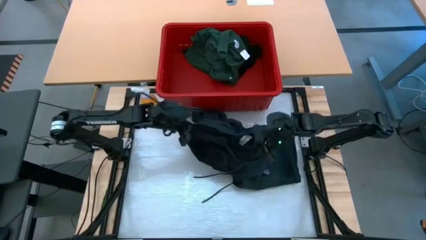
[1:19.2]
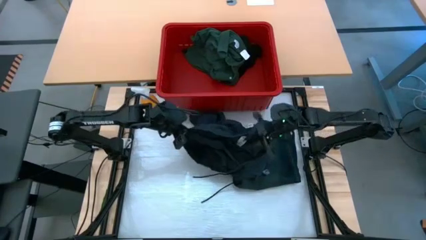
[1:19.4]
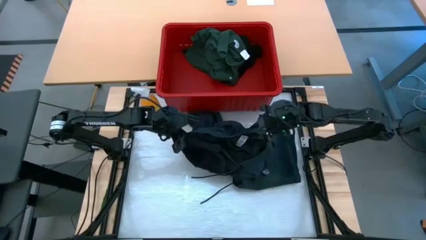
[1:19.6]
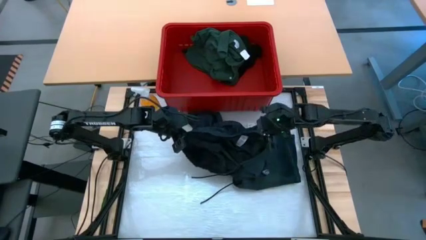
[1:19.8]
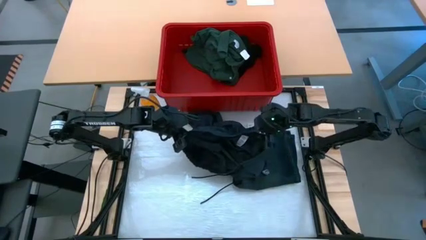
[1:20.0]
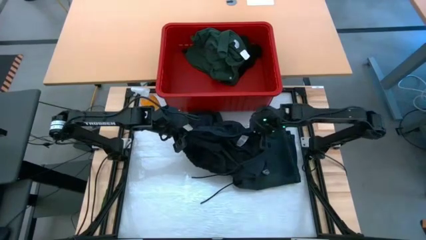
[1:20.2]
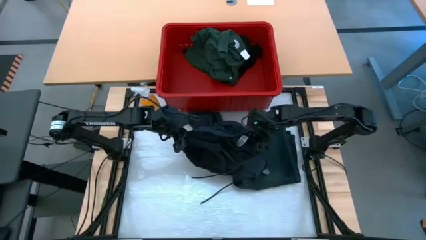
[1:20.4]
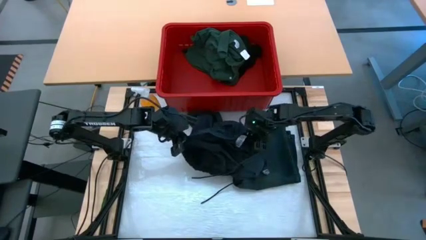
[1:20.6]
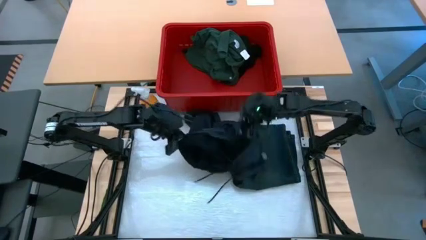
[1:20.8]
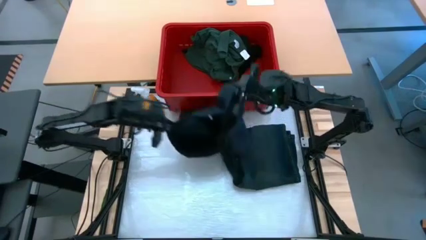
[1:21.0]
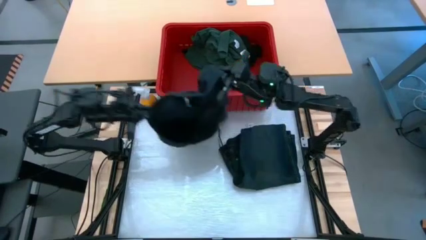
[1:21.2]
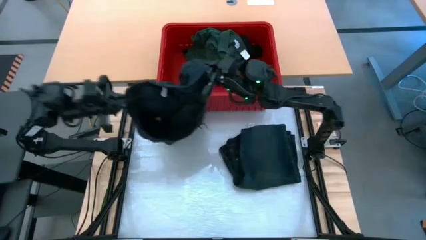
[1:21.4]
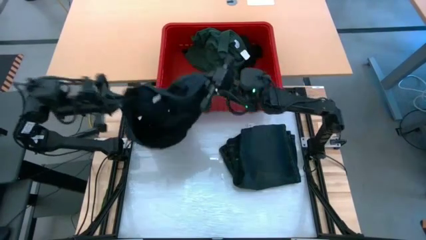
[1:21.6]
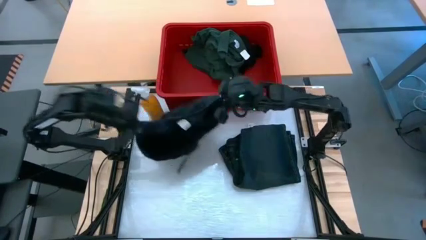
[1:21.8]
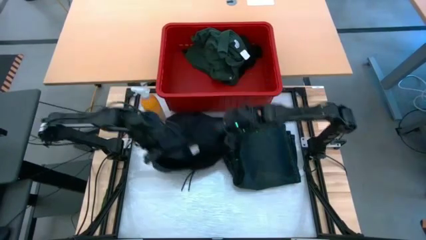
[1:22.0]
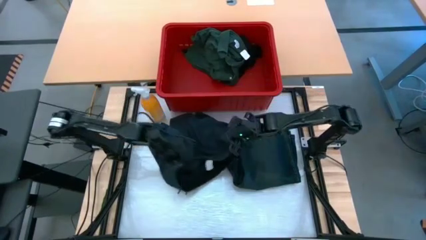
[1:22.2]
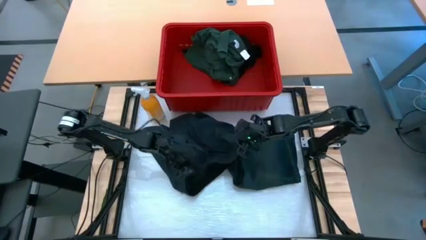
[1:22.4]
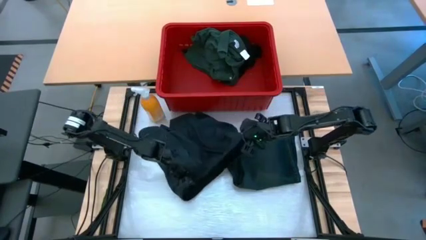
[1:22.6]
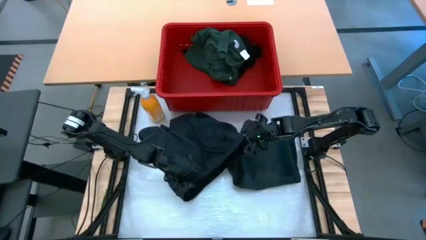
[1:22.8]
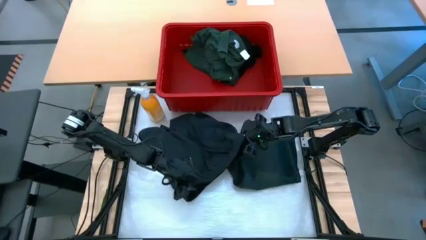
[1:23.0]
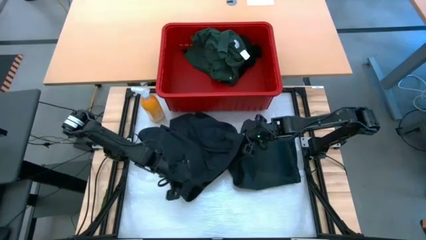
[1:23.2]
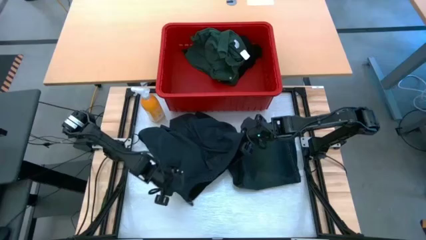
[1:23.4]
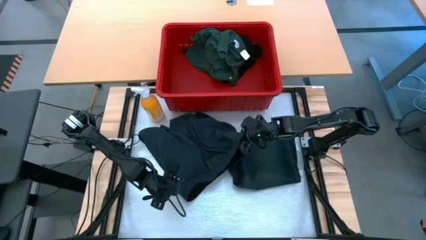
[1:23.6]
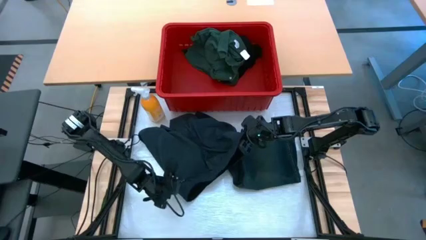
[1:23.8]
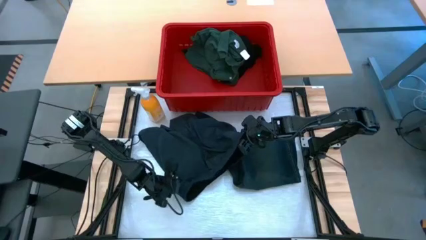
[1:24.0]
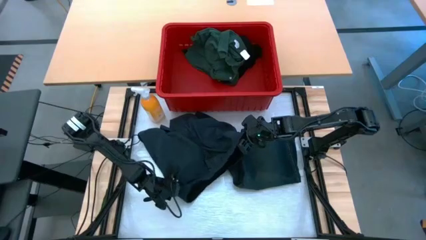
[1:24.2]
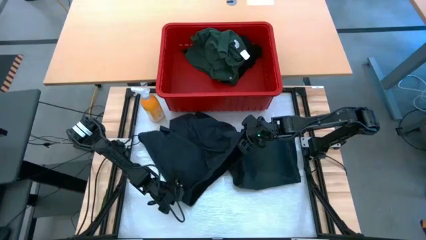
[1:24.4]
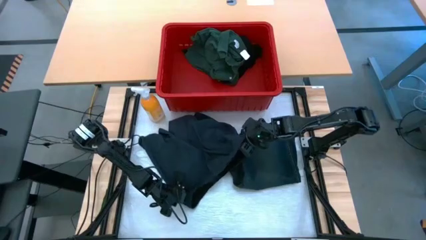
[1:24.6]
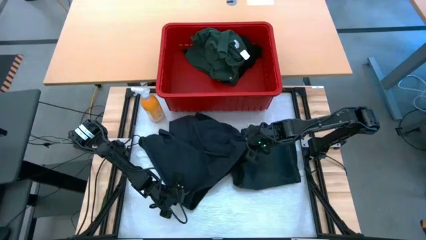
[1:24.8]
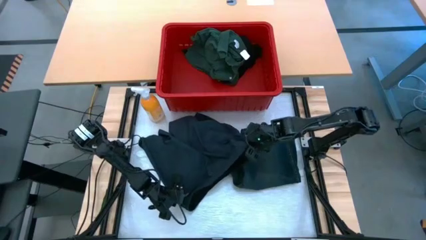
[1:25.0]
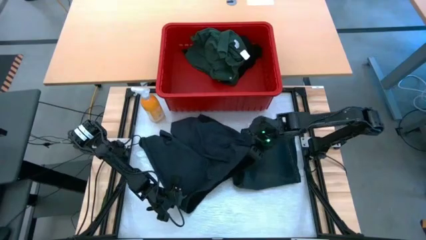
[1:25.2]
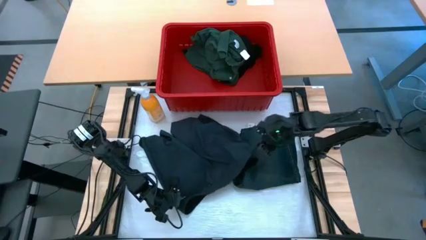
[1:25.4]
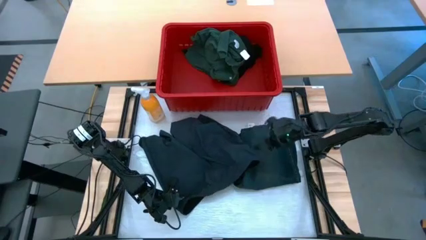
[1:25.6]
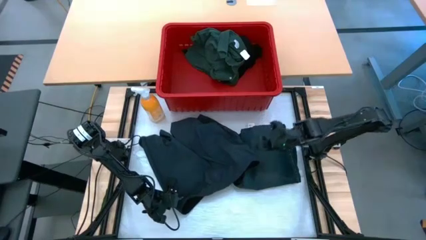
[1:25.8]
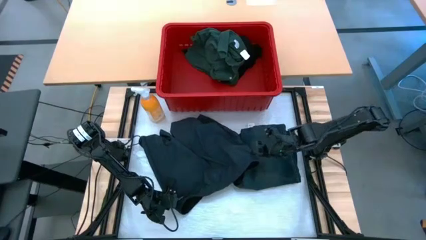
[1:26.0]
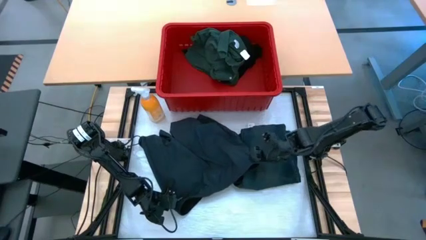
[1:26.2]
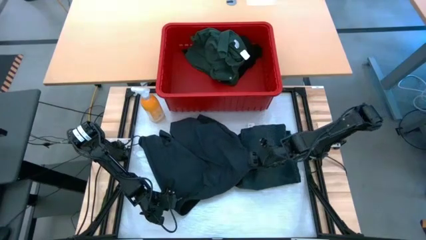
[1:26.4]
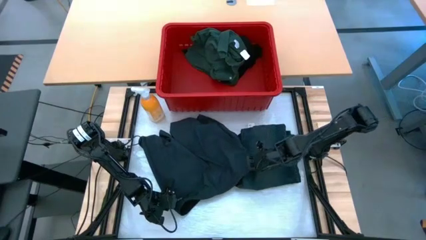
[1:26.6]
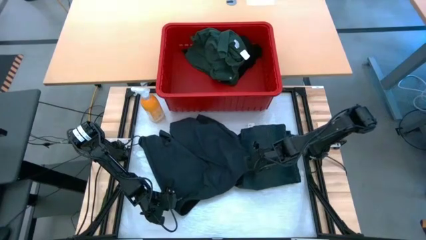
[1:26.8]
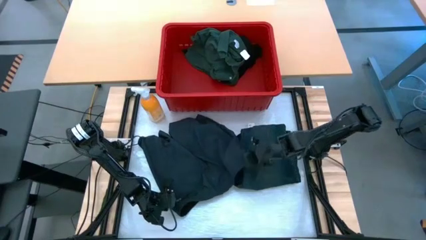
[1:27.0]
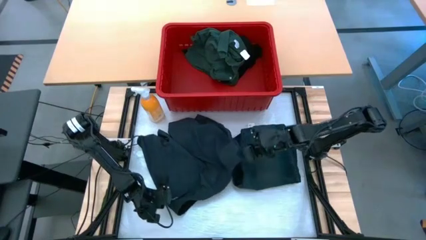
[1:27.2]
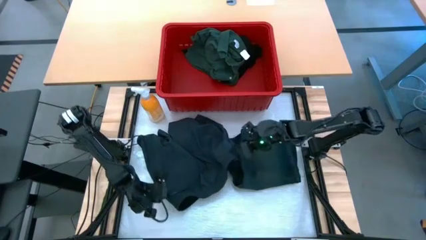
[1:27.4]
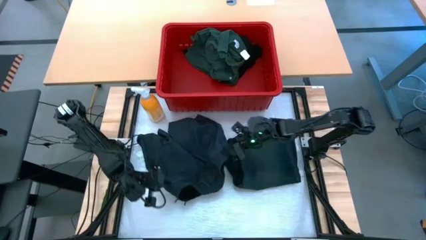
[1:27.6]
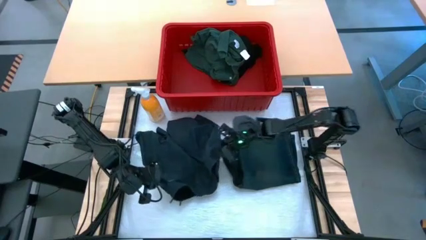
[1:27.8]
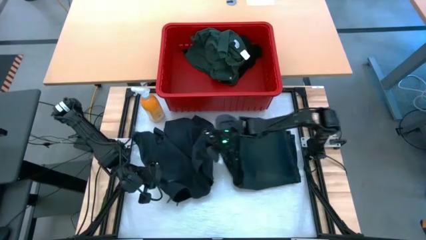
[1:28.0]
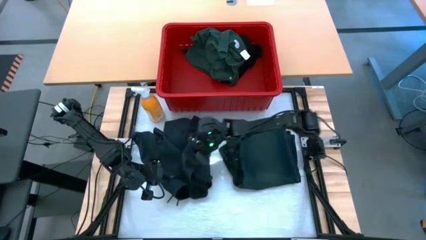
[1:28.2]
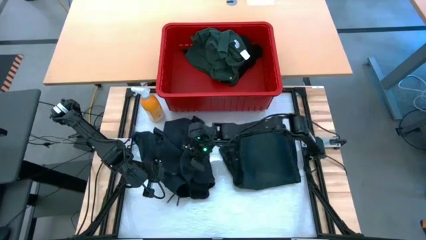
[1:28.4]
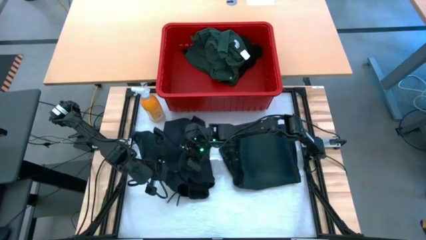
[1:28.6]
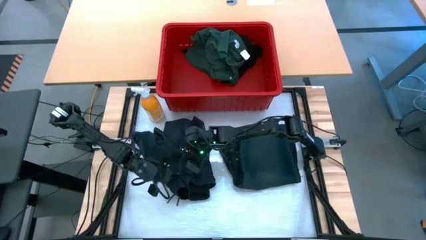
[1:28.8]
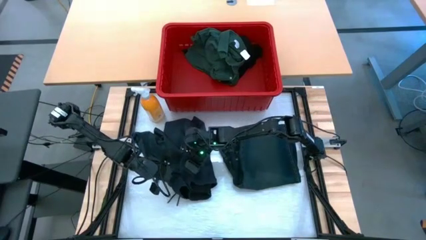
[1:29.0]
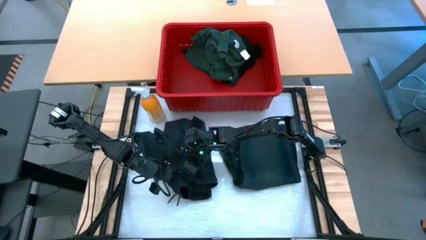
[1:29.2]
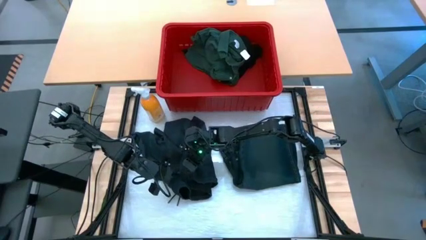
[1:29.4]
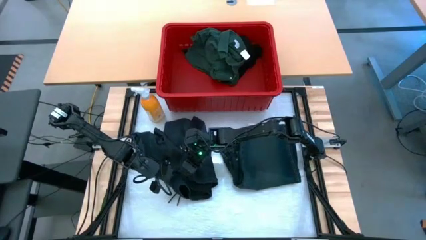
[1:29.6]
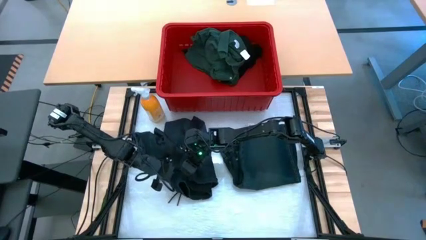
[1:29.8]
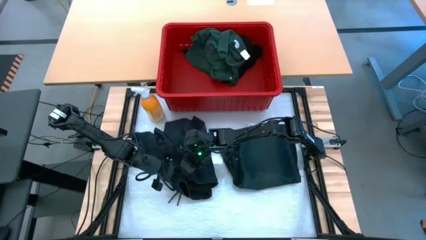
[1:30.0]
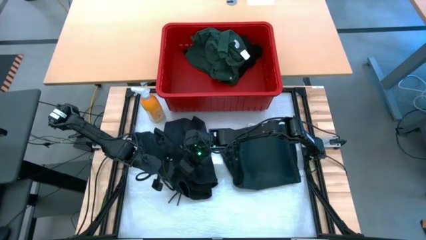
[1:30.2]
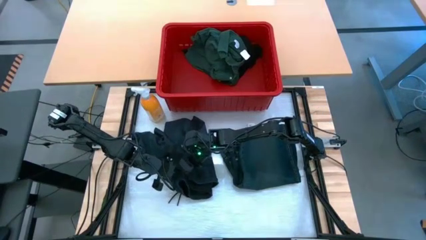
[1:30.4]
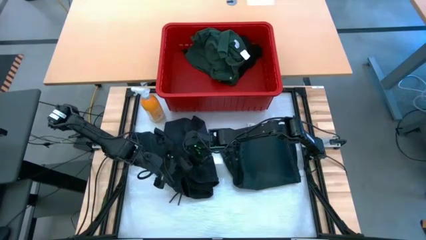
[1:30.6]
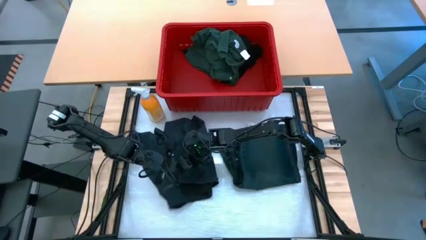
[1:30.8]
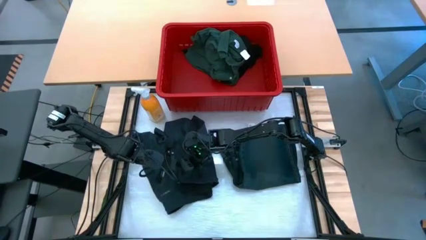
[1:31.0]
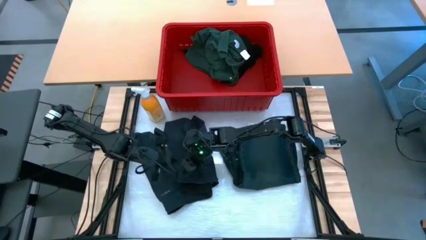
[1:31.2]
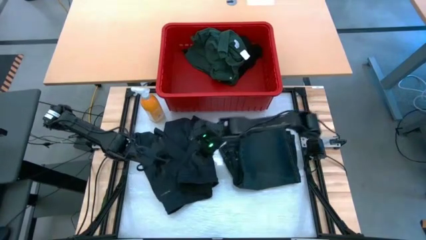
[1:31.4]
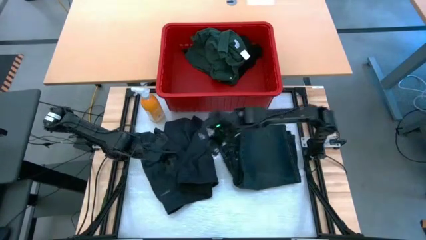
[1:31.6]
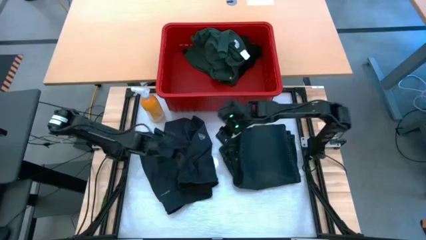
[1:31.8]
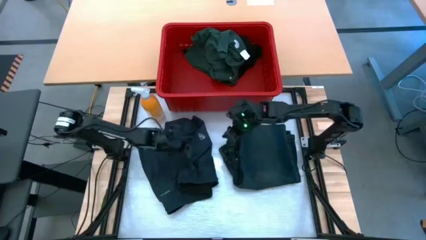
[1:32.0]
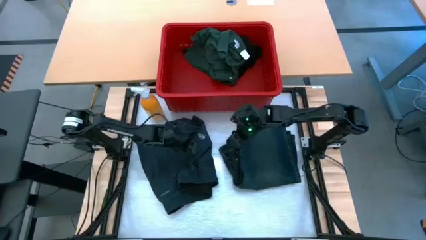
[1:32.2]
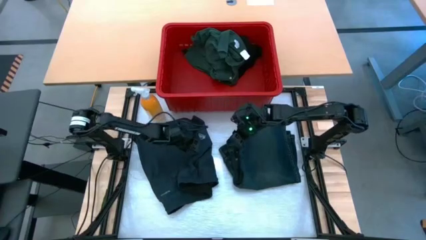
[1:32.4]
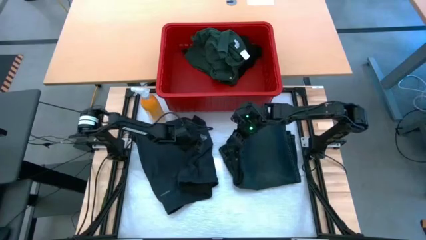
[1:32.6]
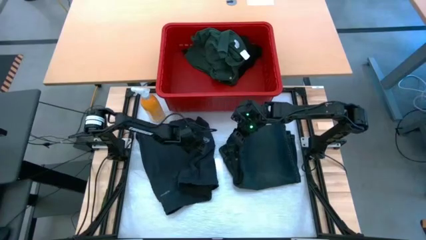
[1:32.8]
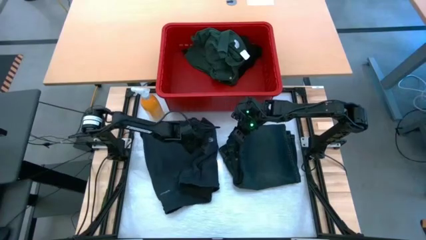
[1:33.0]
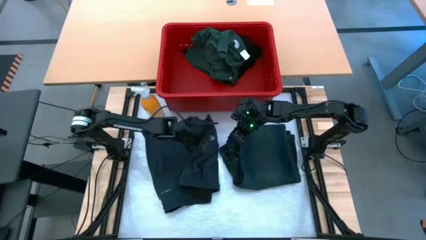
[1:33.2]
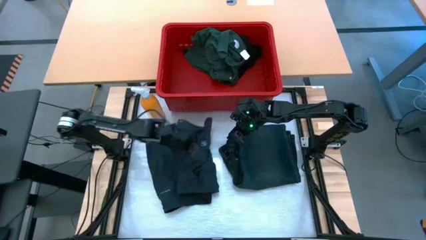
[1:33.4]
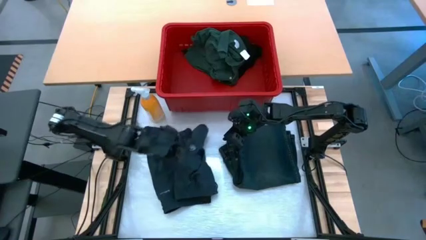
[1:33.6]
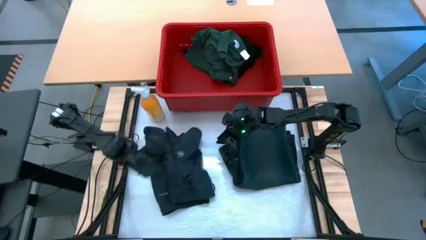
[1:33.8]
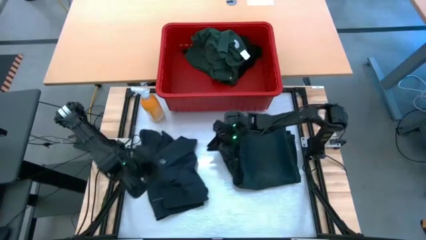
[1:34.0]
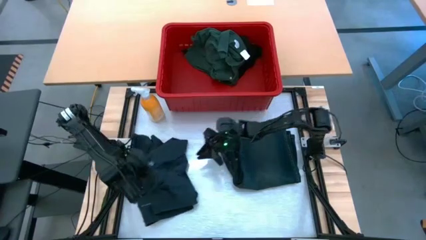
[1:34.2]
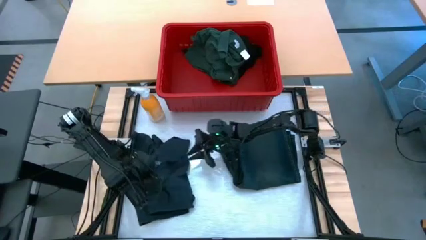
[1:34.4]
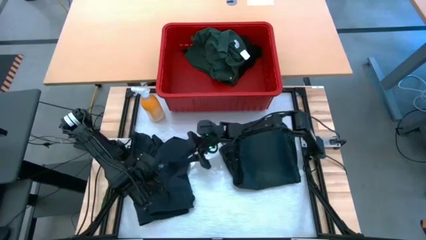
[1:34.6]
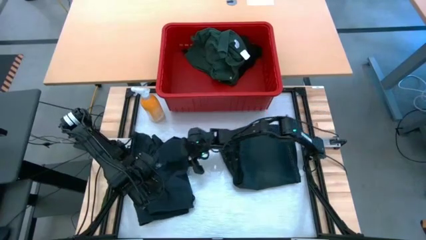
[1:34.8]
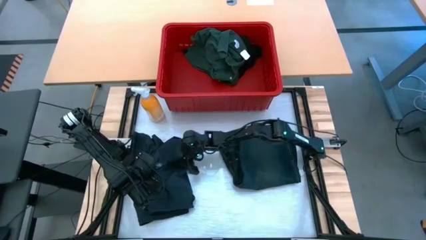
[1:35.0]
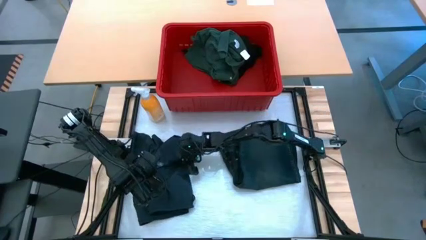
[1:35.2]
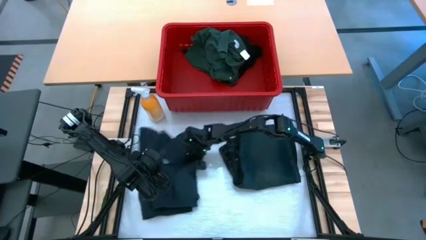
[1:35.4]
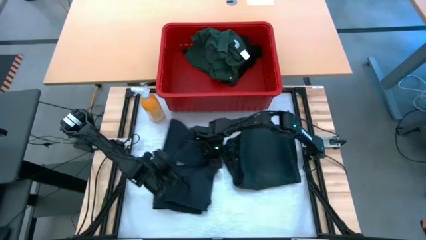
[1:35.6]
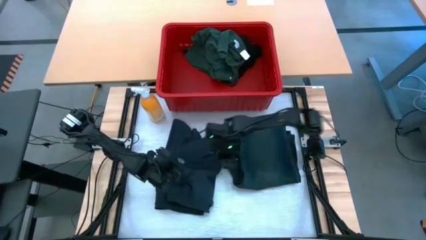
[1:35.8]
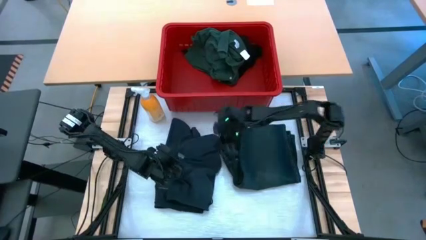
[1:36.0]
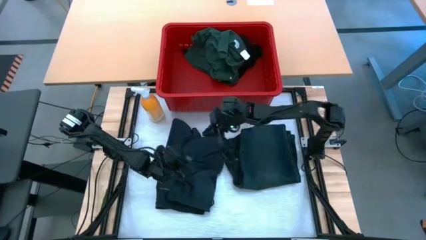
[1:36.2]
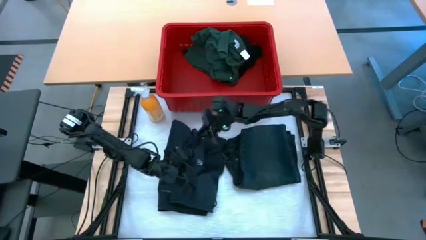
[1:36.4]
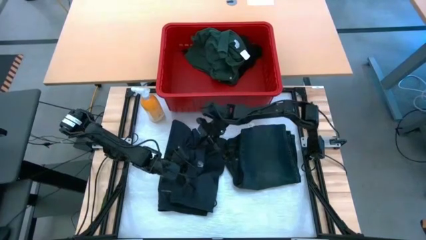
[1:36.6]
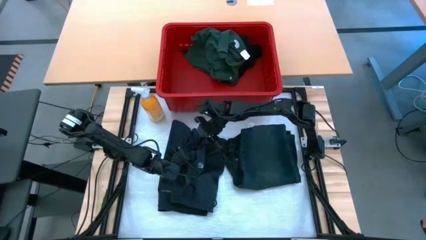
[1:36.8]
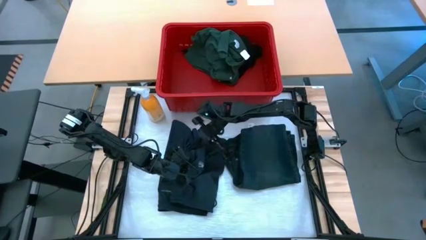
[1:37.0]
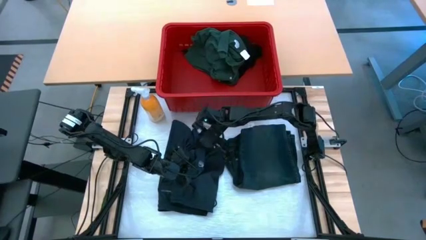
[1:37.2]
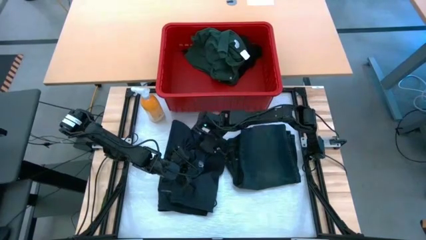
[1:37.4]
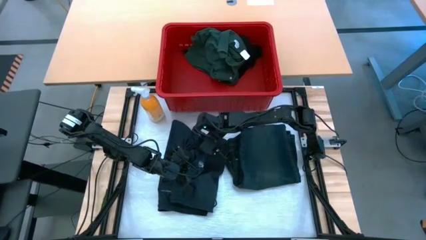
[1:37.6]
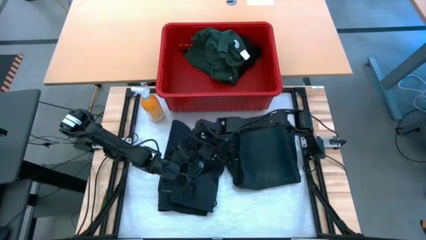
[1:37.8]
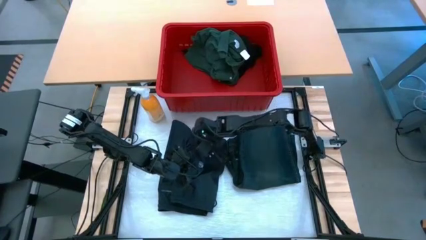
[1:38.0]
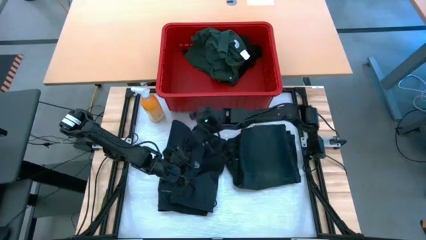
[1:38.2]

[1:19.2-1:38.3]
Task: Fold laundry
Fold the black shorts
